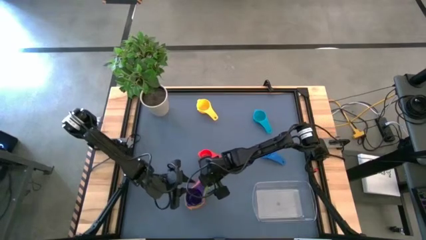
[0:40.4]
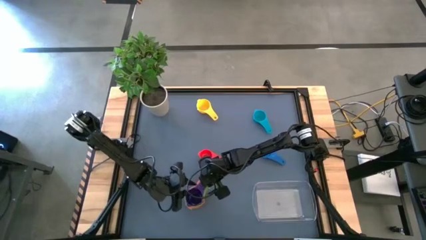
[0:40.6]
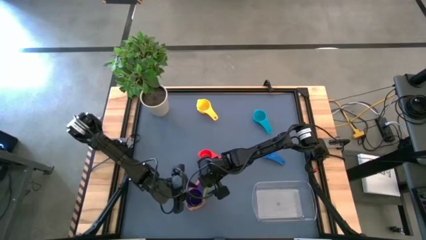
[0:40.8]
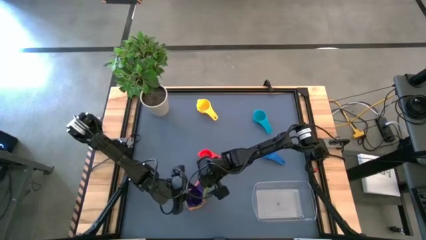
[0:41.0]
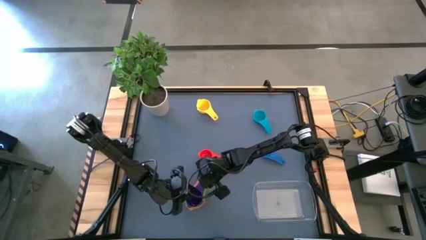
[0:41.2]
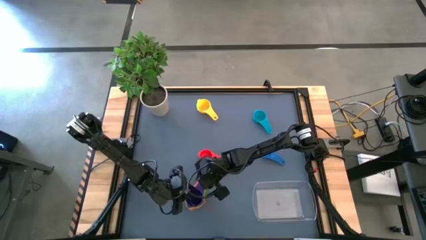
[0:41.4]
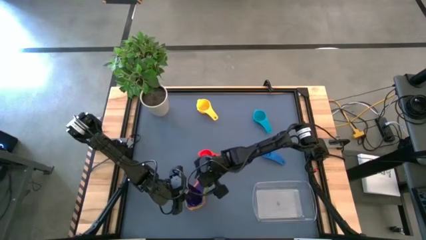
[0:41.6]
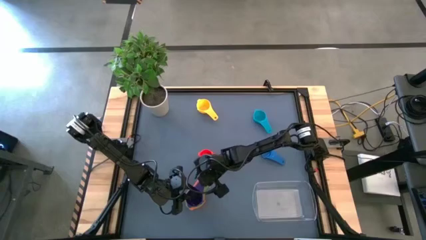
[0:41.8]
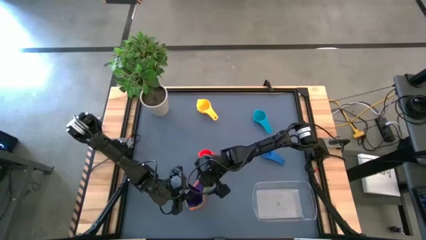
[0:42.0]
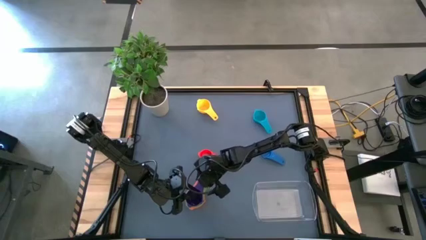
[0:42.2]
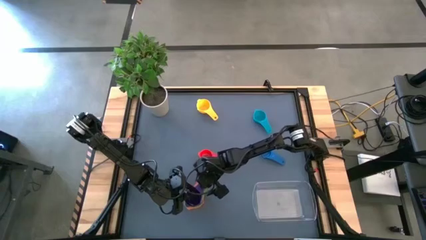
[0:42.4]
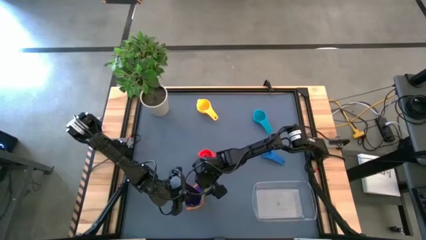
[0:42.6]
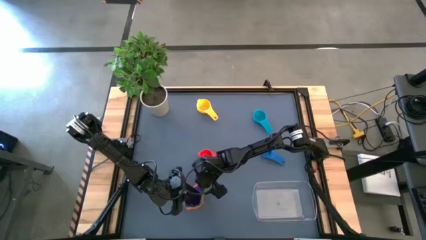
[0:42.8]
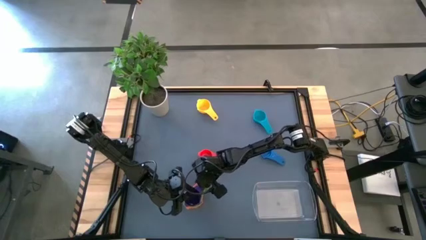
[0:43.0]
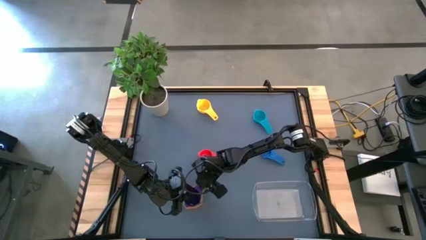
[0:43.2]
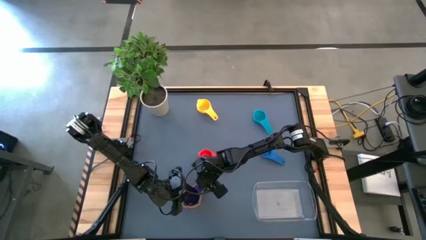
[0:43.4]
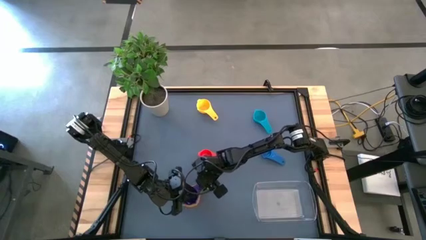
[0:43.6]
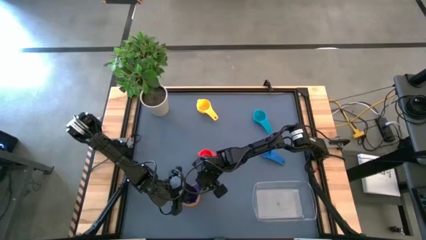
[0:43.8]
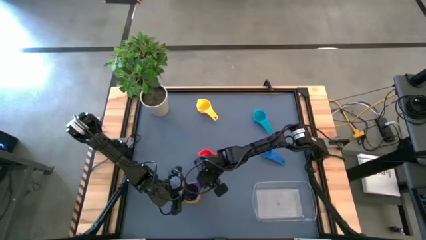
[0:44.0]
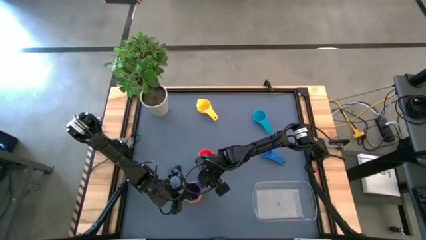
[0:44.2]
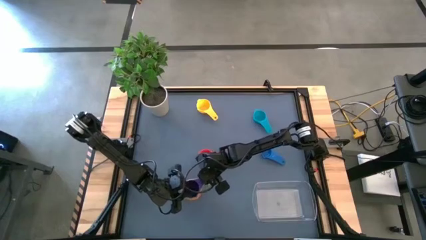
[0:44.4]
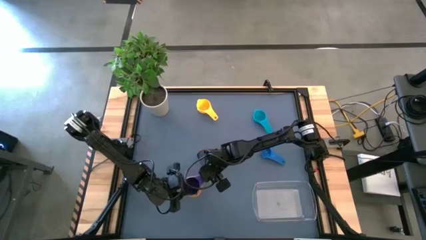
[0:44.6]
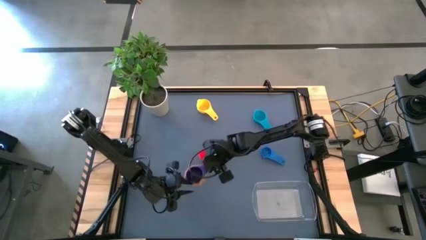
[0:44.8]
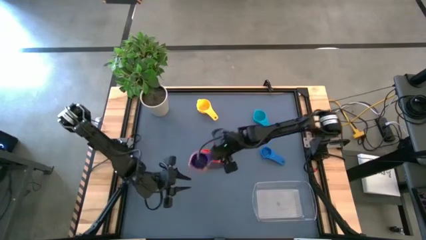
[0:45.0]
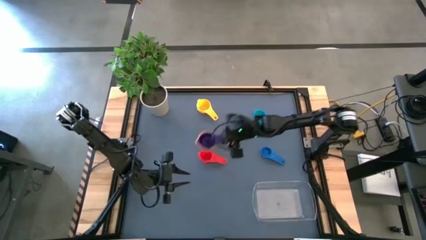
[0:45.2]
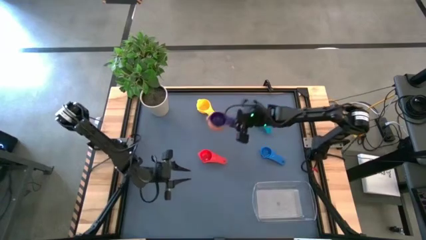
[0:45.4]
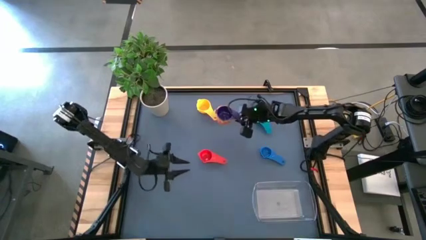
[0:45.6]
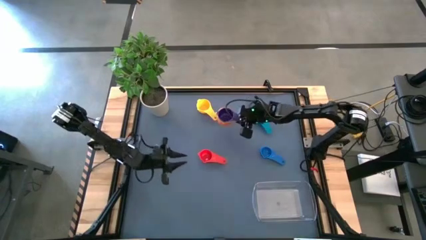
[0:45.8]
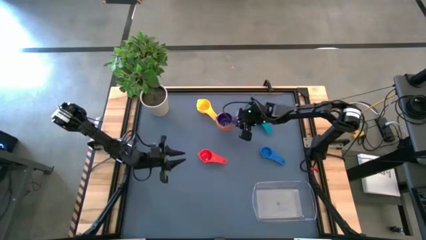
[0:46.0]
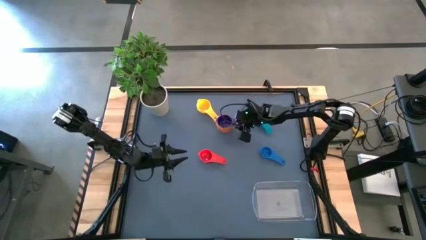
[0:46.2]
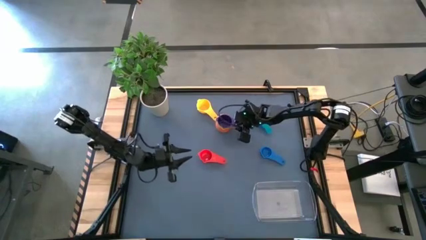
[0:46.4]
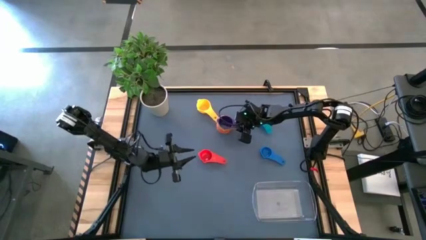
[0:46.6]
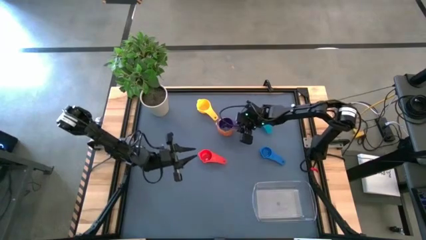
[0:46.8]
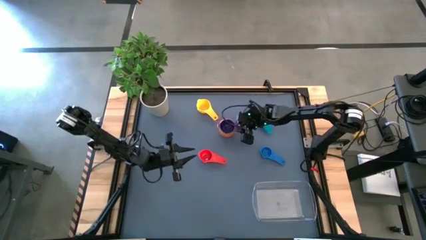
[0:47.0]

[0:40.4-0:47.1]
Task: Nest measuring cups in basket
Move the stacked nesting measuring cups to the top middle of the table

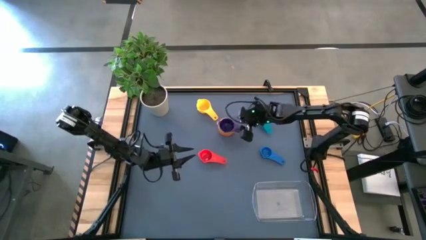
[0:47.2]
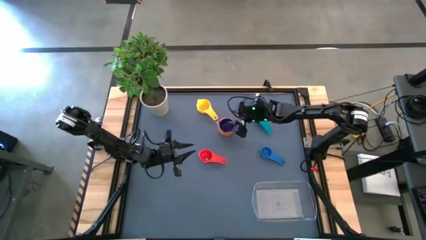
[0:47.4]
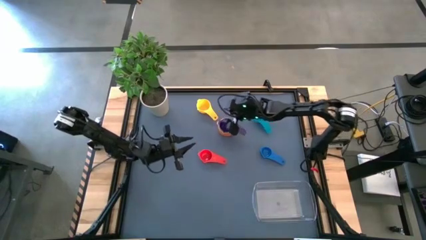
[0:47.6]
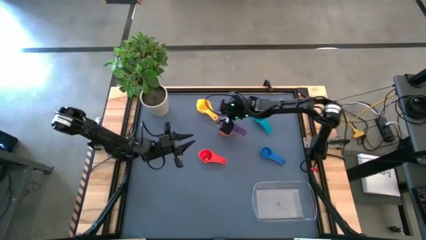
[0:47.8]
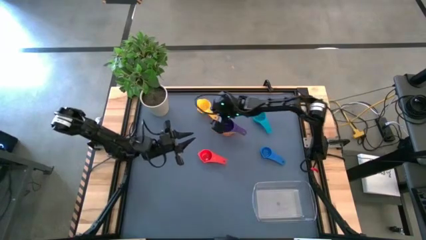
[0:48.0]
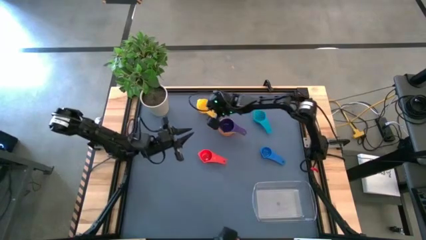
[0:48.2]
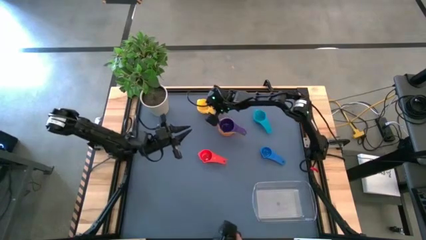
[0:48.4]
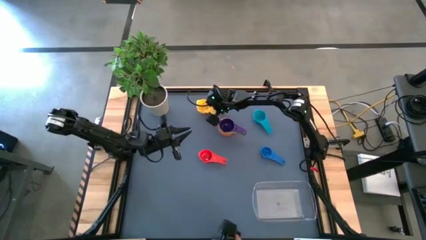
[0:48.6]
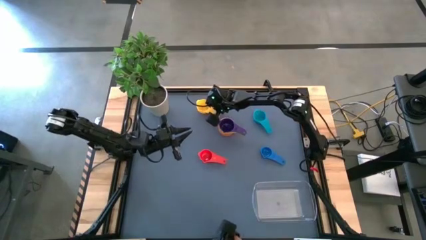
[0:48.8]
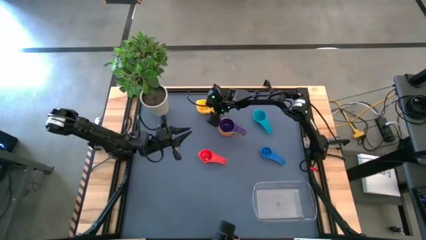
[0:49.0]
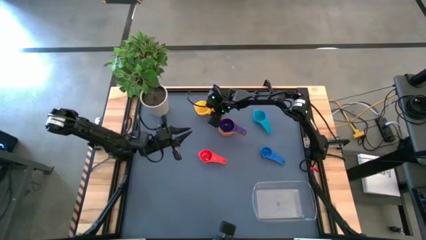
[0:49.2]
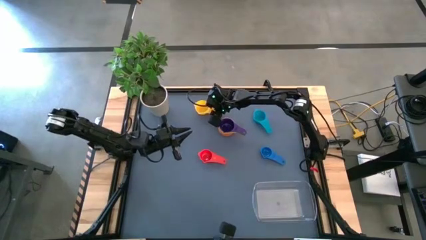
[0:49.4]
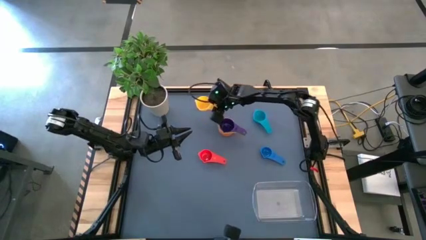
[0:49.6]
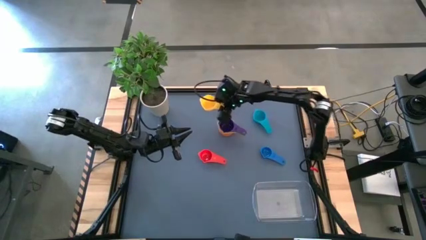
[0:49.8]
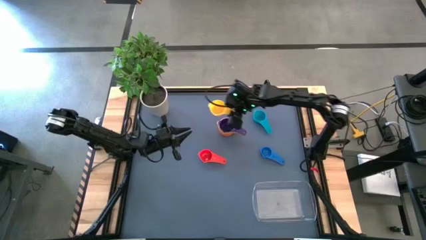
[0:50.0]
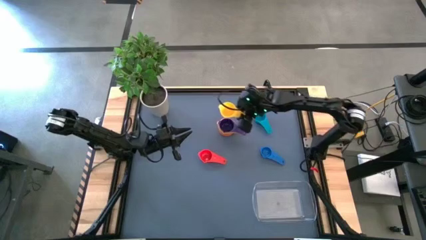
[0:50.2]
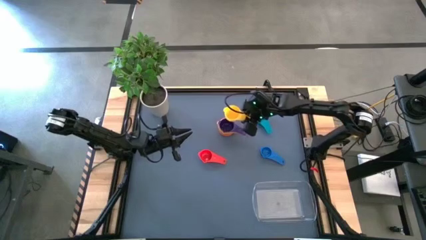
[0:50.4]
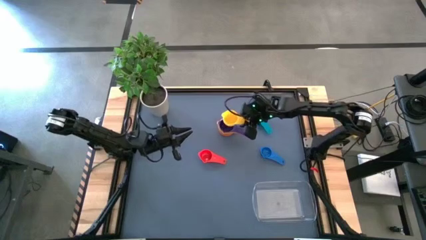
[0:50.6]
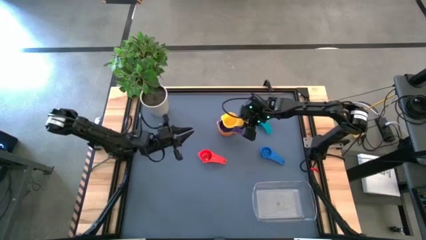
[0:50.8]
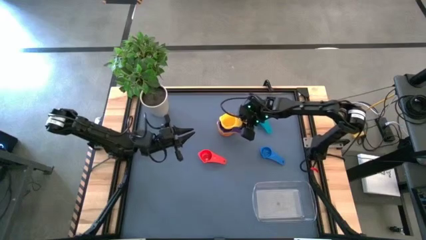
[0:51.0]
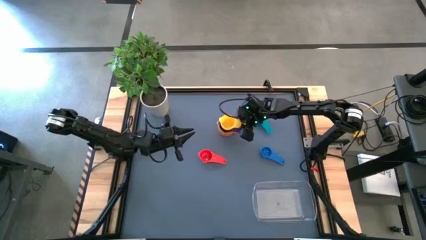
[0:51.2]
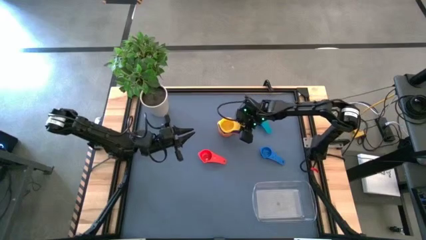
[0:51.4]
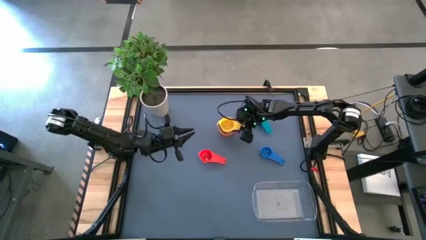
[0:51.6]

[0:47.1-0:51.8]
Stack the yellow nest measuring cup into the the purple nest measuring cup

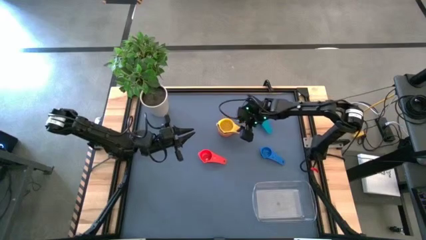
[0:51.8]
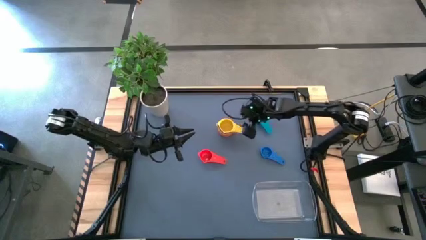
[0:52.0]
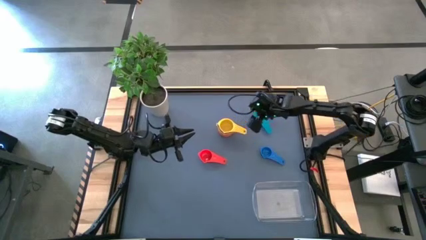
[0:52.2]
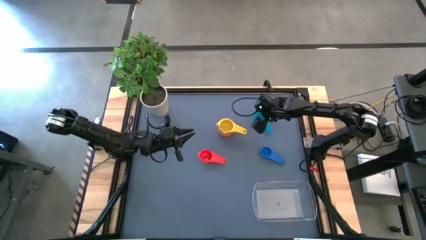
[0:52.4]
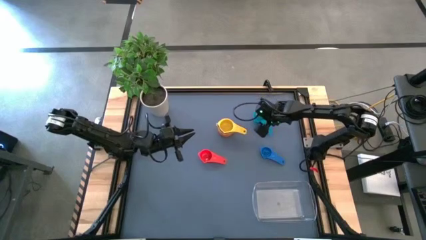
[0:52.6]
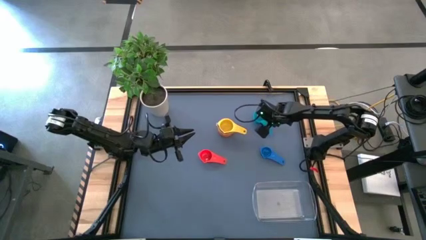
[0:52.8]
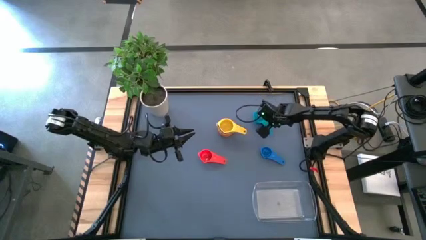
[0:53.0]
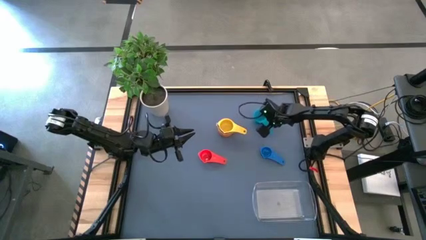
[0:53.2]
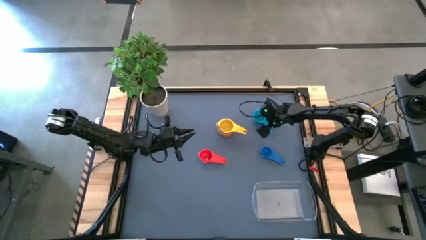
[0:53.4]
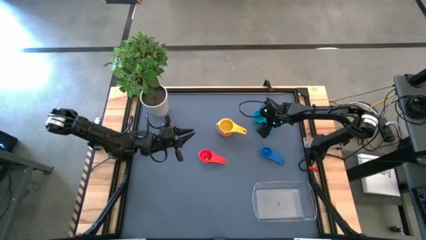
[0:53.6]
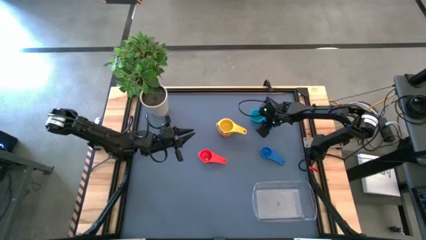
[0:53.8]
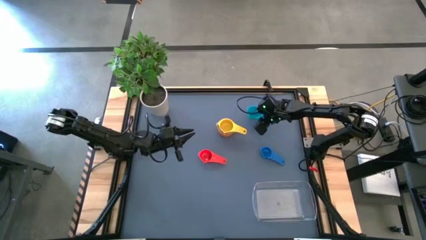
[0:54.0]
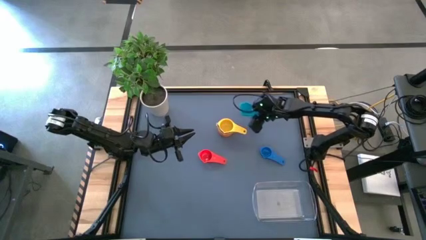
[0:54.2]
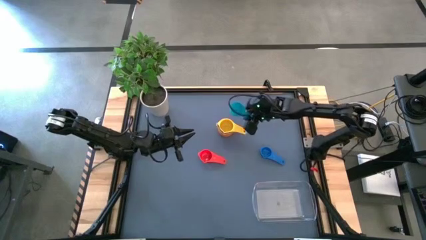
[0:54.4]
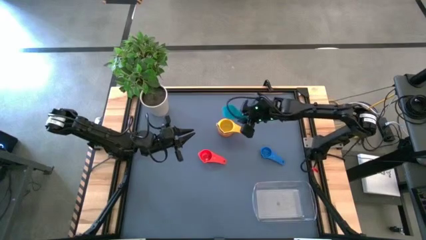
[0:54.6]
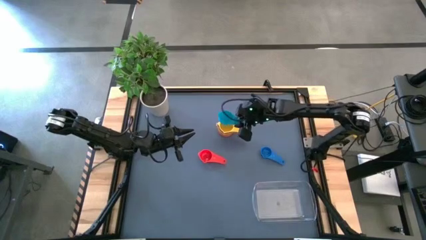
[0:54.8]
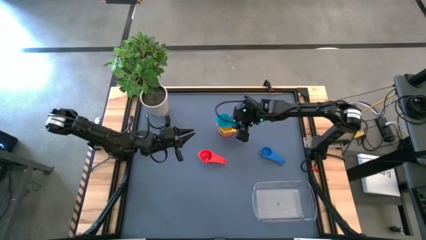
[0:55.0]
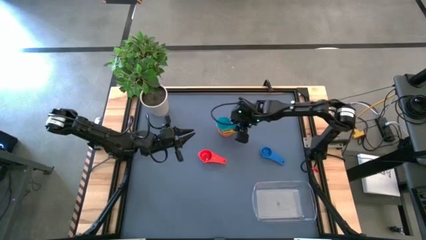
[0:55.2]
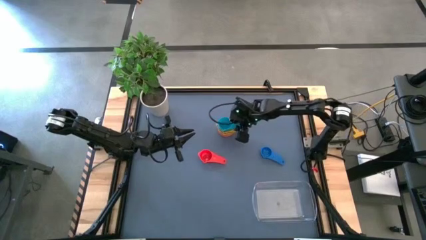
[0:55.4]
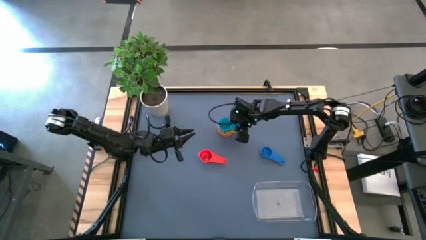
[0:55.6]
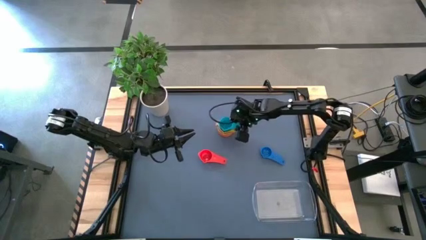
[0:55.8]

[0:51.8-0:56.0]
Stack the light blue nest measuring cup into the yellow nest measuring cup

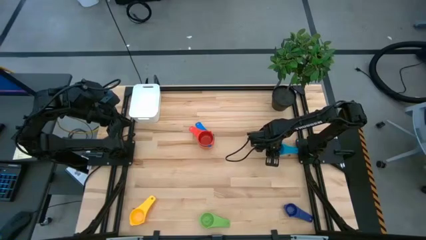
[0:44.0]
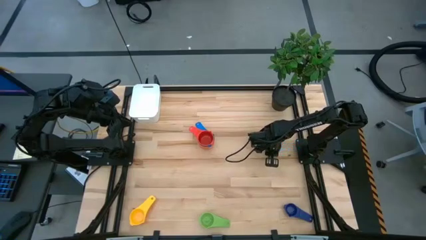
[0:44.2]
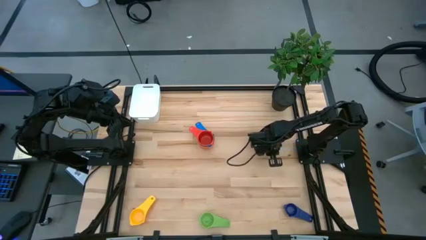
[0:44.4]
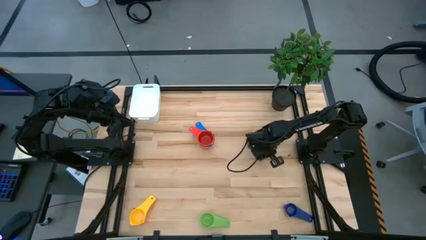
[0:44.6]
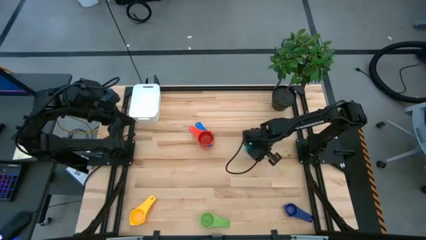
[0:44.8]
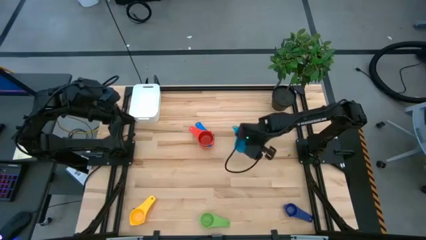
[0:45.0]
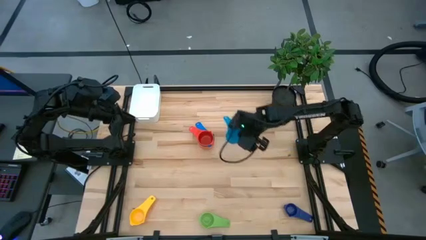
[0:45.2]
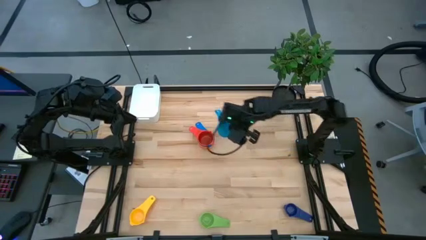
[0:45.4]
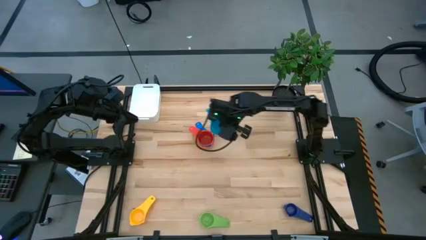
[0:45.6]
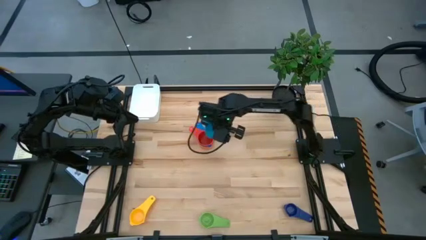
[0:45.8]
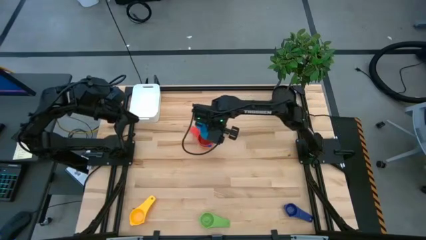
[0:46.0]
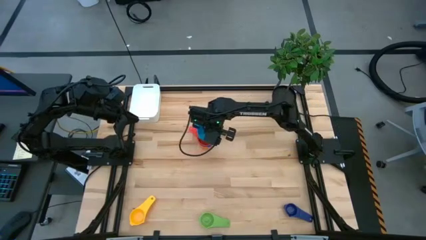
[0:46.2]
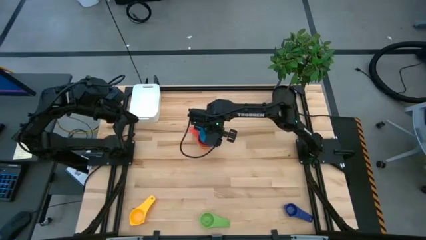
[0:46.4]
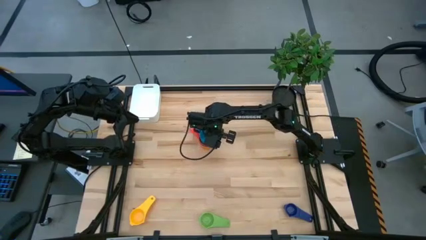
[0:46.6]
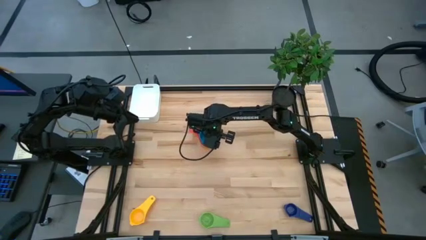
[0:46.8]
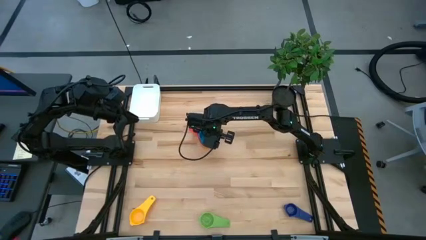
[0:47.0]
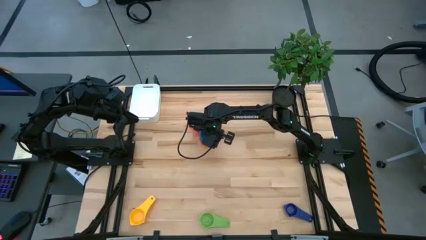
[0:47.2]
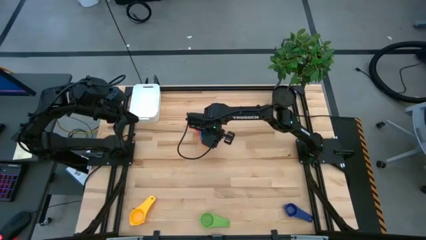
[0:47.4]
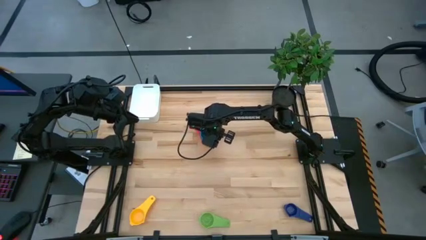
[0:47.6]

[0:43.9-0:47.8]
Task: Nest measuring cups in basket
Stack the light blue measuring cup on top of the red measuring cup
